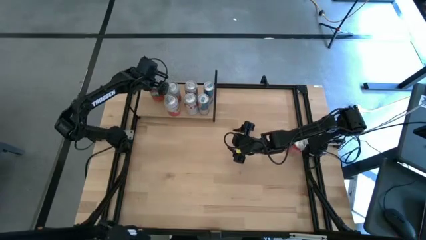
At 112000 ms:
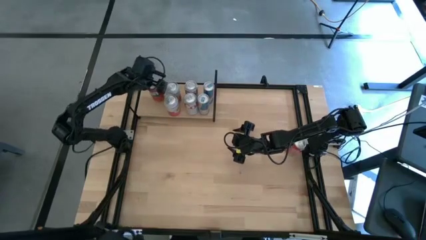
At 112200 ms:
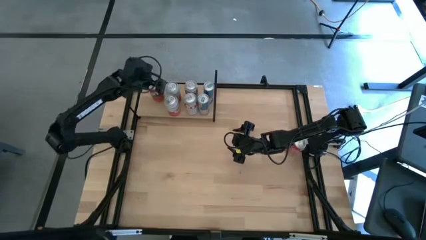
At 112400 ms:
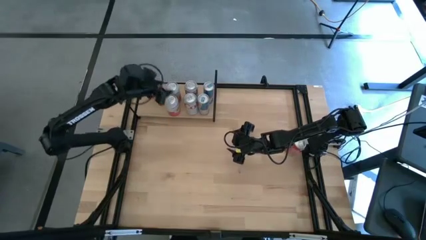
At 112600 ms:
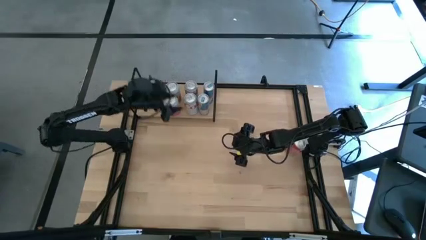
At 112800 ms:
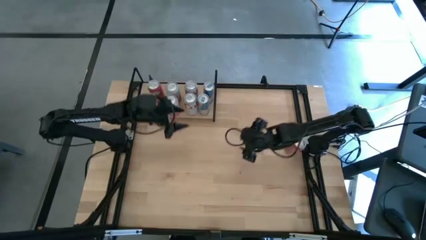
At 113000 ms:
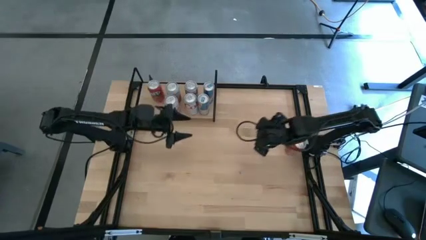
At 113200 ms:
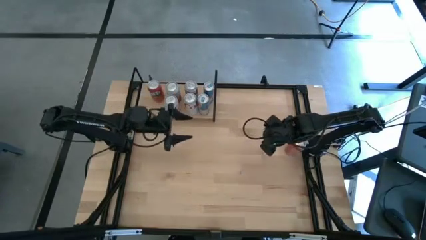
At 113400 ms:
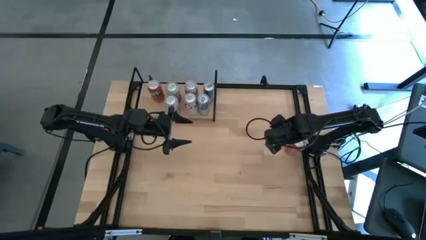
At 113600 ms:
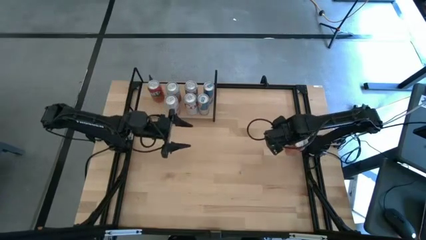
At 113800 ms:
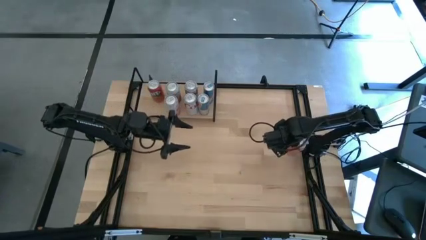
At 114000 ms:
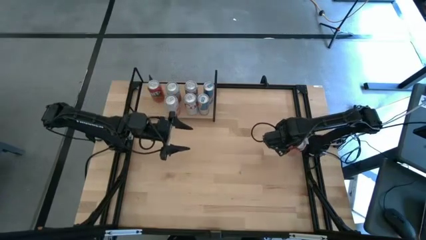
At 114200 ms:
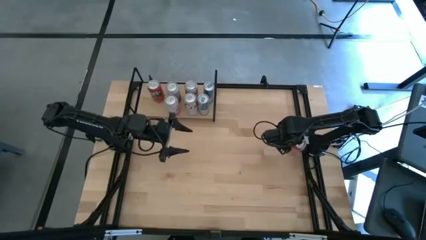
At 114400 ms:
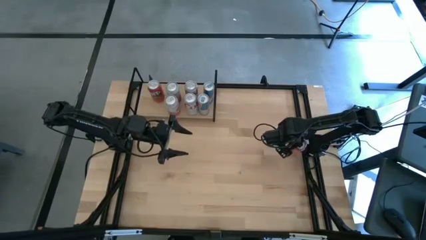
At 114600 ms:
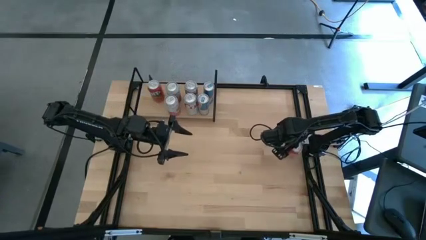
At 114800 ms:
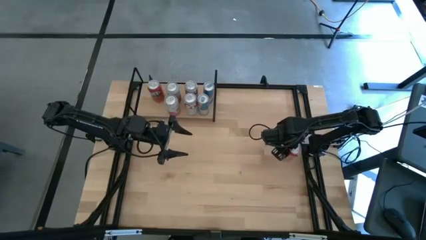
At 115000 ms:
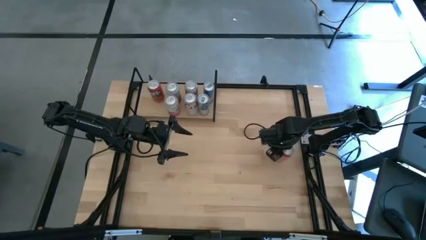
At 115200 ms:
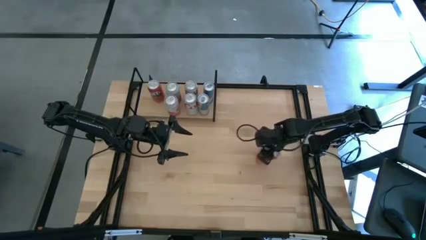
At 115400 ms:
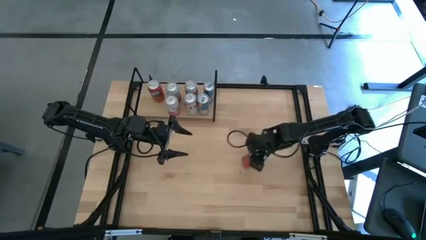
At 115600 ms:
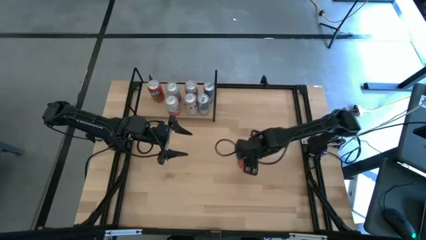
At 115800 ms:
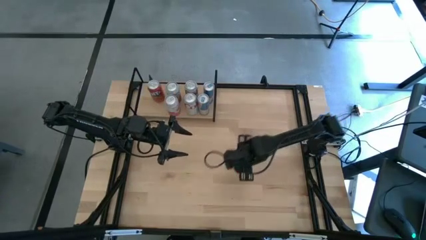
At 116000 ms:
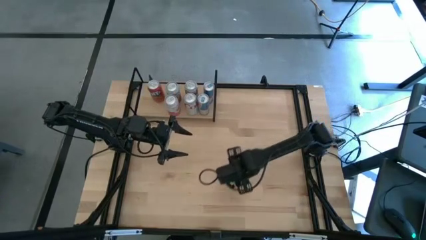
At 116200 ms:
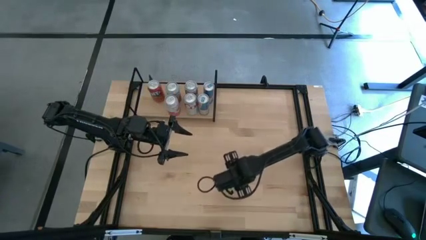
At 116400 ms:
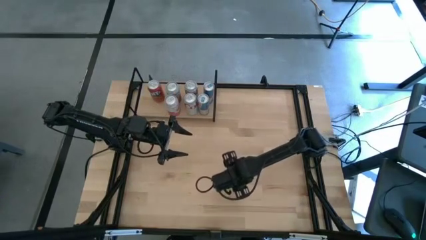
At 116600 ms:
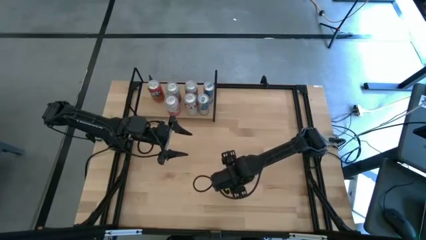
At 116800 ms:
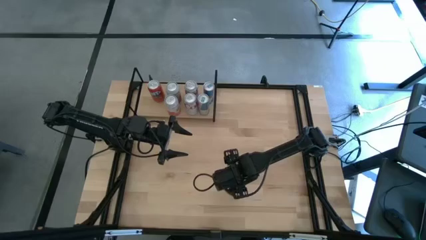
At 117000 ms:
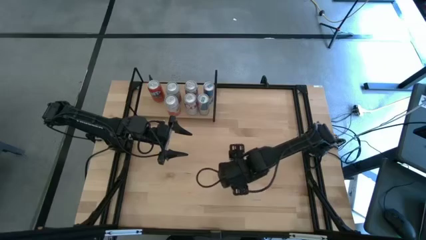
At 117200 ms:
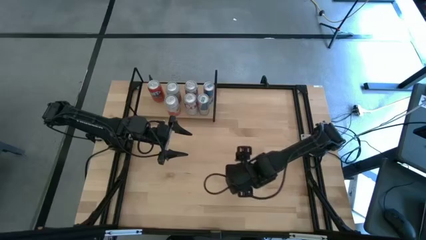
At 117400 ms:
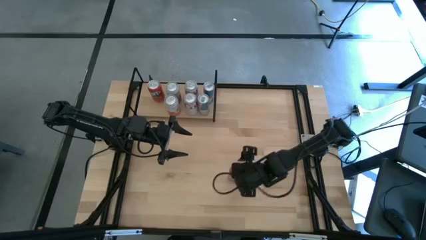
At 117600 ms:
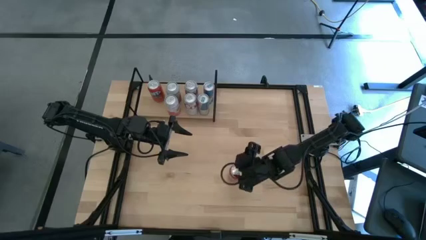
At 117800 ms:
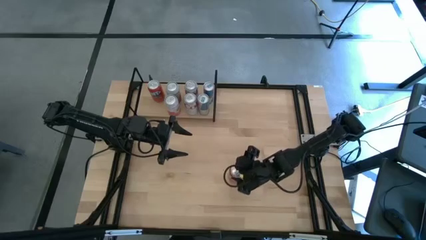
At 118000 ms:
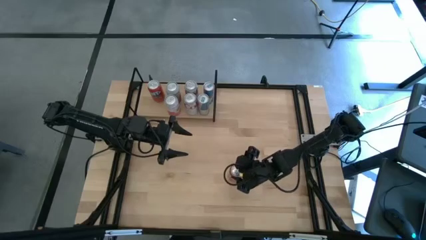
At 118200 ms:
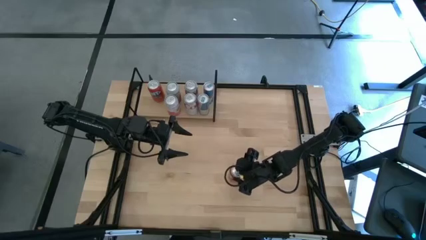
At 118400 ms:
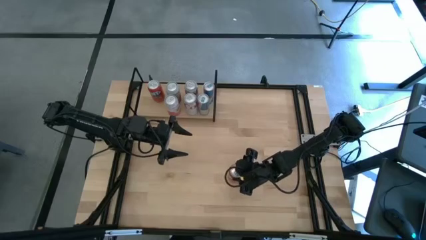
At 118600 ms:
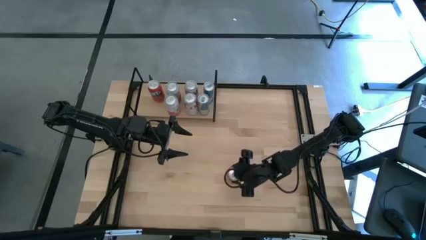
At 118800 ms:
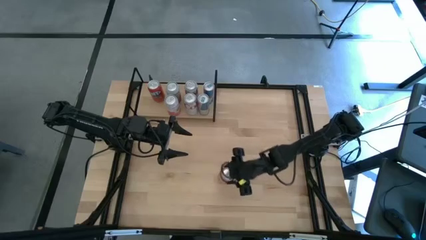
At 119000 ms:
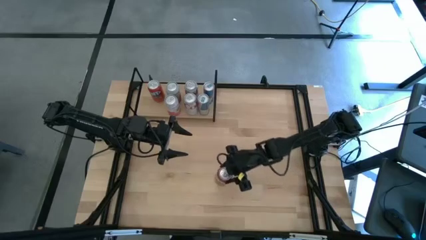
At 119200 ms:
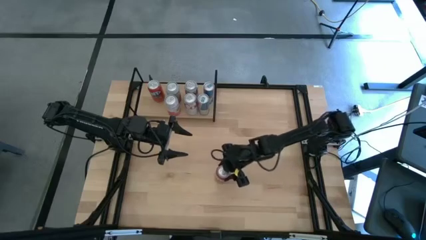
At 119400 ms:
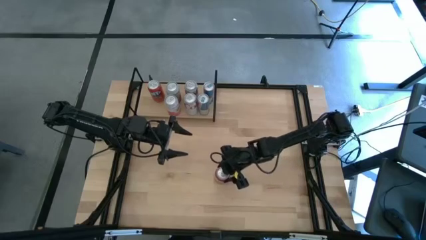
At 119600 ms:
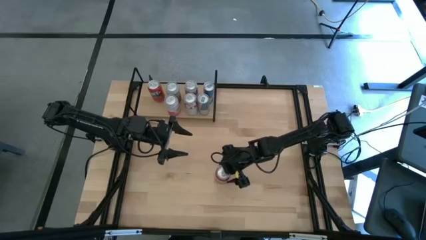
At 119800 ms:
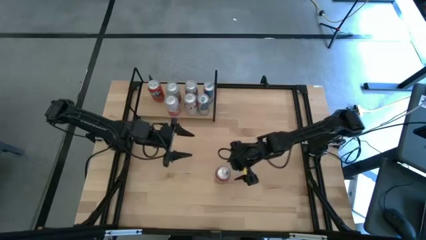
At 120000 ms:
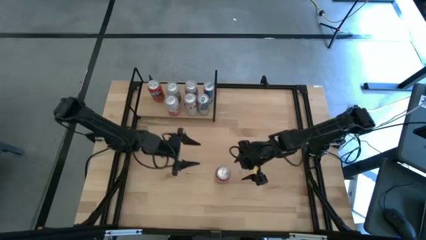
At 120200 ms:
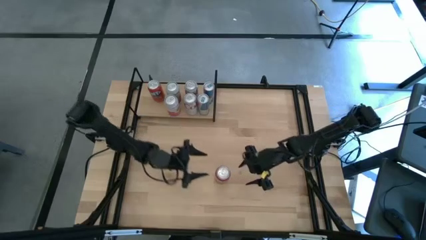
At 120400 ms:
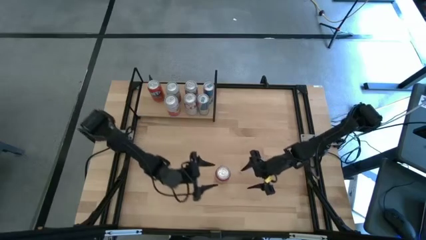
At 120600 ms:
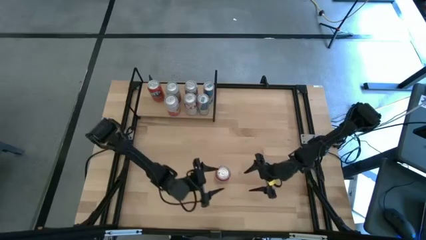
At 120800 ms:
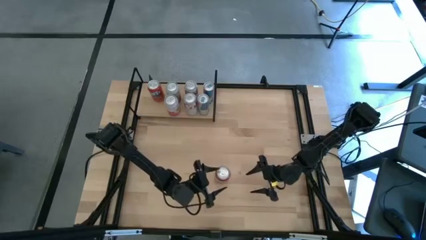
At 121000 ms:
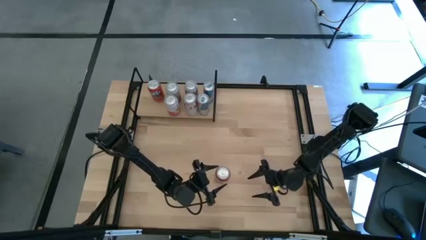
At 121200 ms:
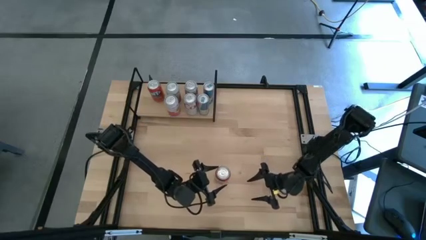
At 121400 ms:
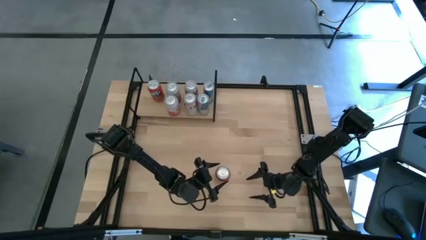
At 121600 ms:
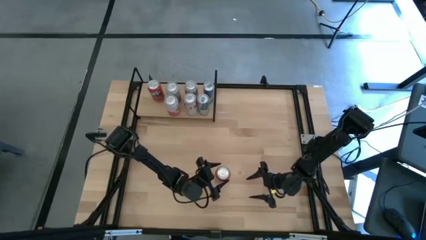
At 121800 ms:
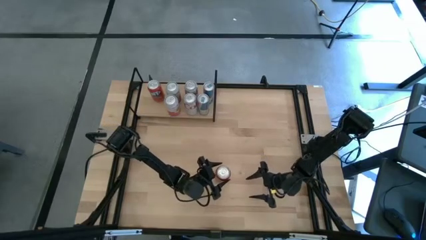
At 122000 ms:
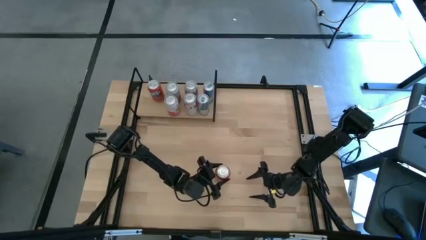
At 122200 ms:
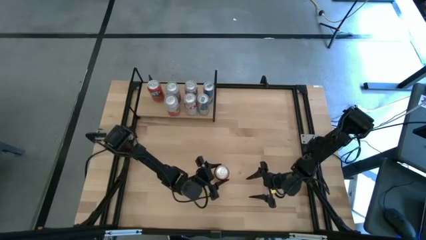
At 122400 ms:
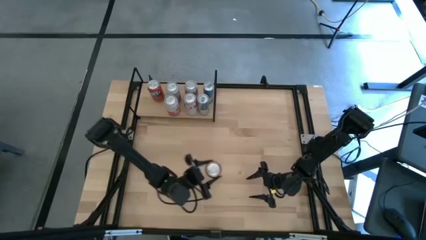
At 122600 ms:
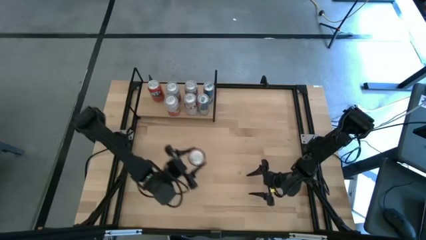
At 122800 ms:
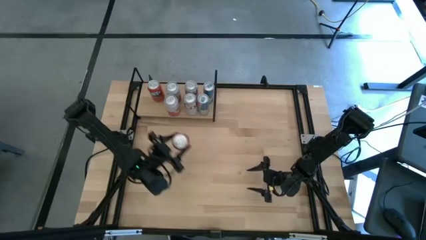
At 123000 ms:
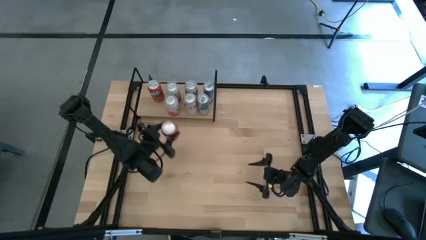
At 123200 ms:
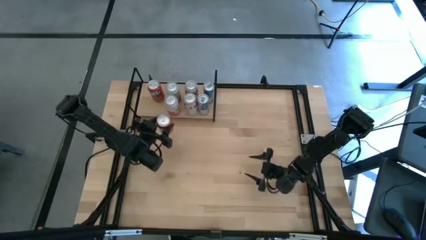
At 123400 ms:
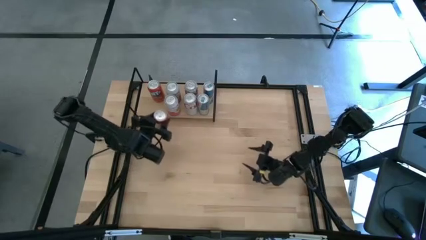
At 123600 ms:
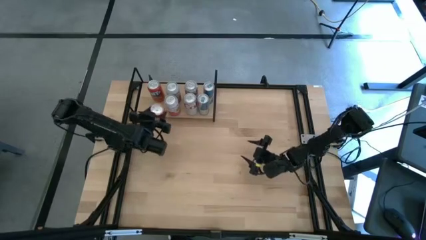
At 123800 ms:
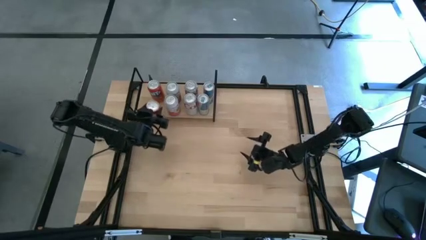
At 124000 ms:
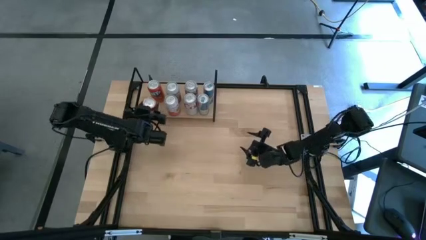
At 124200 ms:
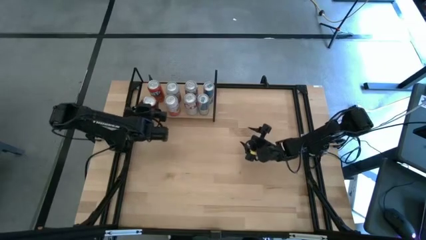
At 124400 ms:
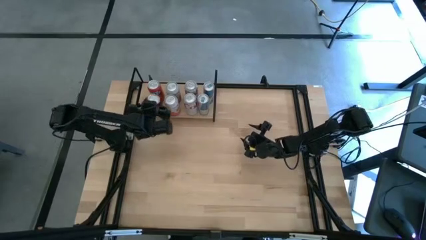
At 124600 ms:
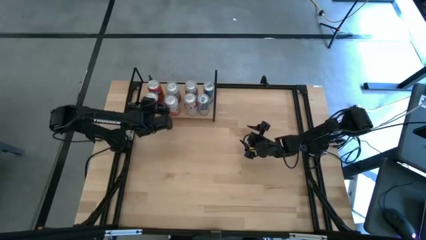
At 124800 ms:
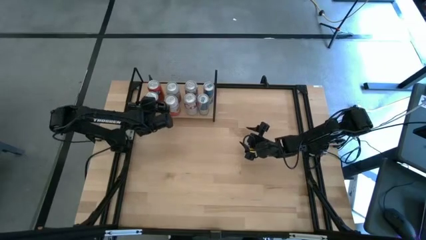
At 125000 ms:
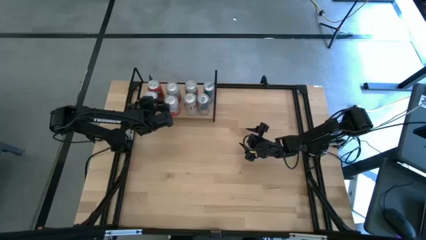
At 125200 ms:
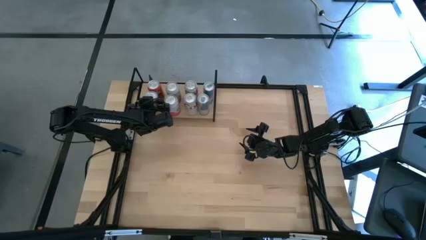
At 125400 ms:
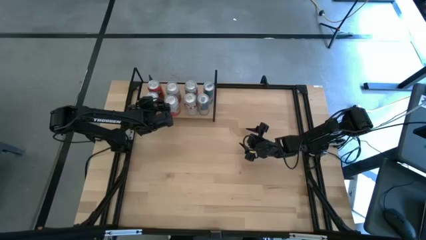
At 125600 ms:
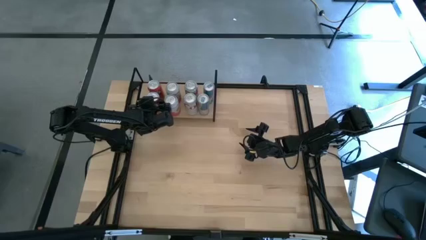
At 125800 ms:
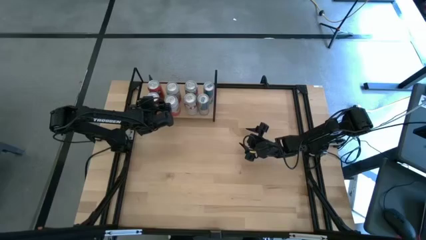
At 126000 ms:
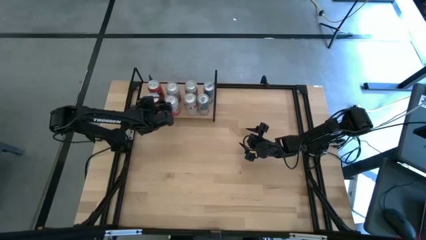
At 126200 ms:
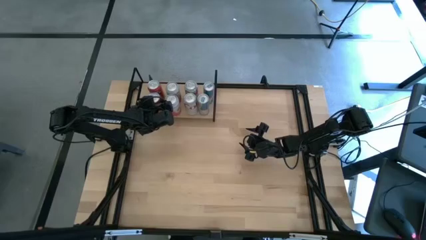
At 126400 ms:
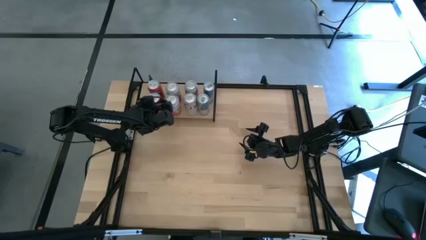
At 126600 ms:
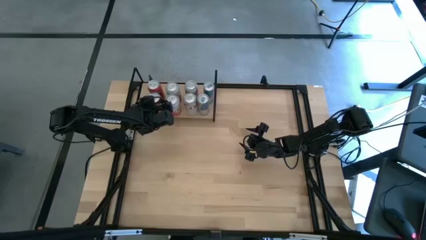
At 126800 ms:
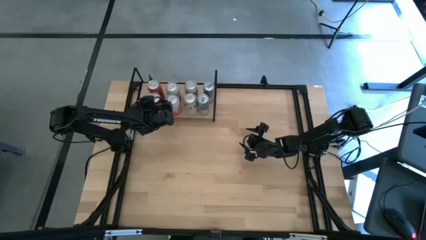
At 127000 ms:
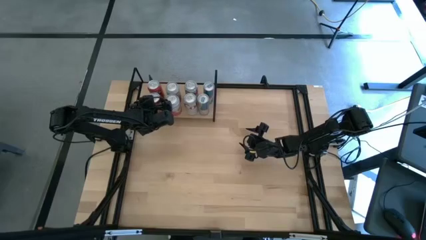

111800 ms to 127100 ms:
Task: Place canned beverage on shelf
Put the red soda can on the shelf aligned with other red soda can
